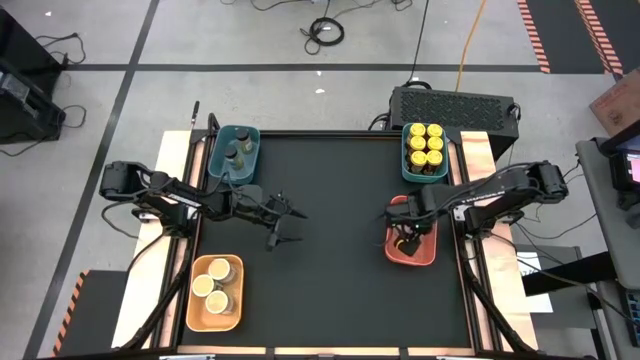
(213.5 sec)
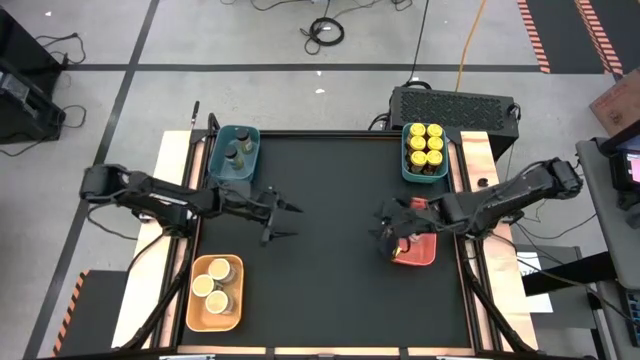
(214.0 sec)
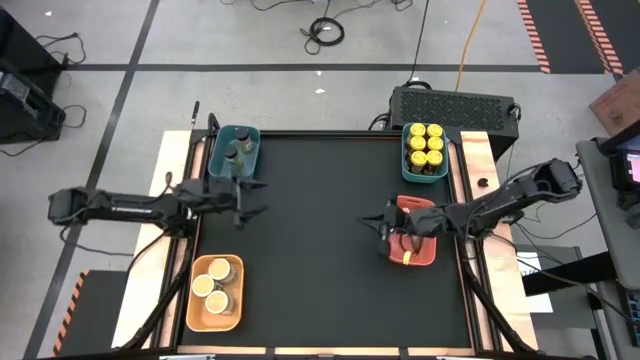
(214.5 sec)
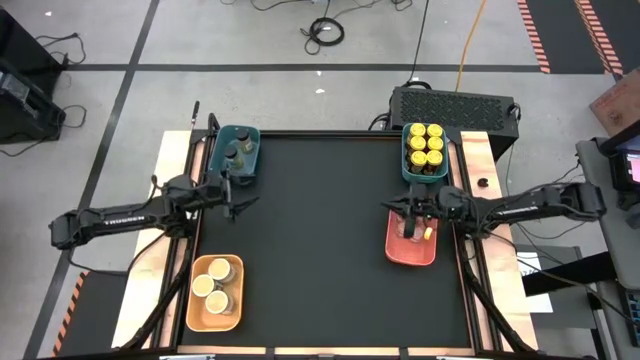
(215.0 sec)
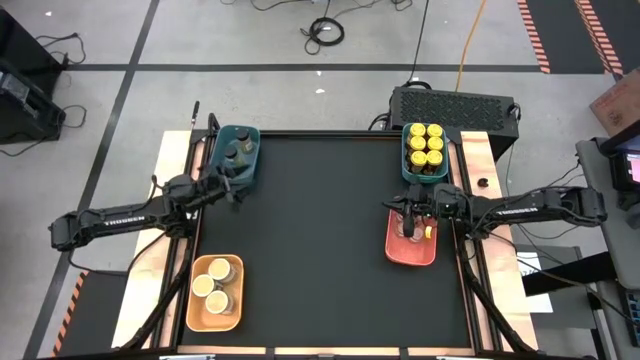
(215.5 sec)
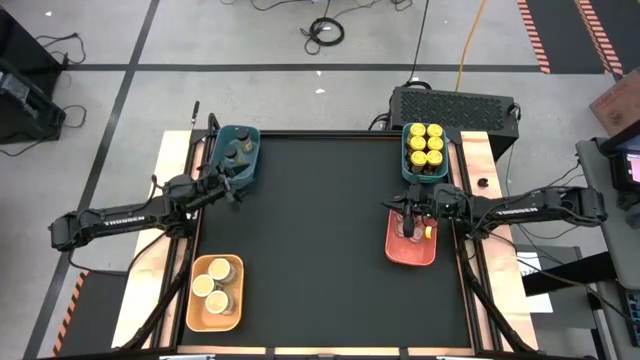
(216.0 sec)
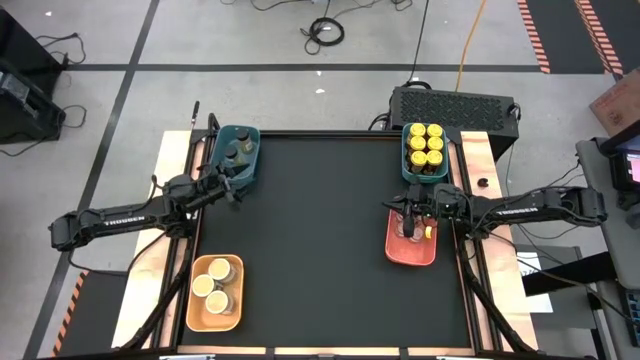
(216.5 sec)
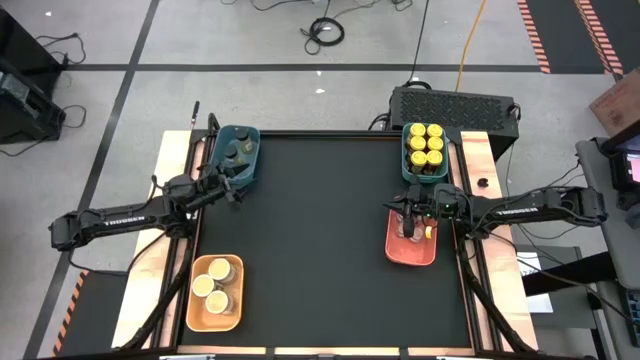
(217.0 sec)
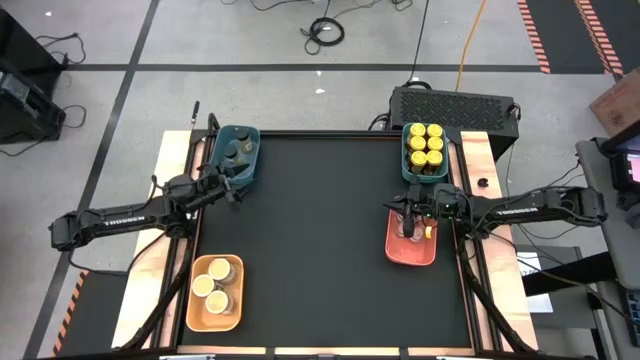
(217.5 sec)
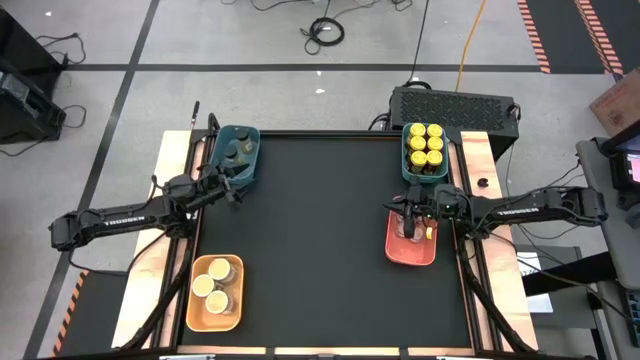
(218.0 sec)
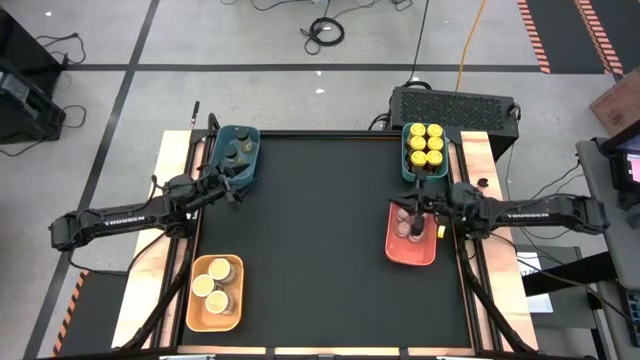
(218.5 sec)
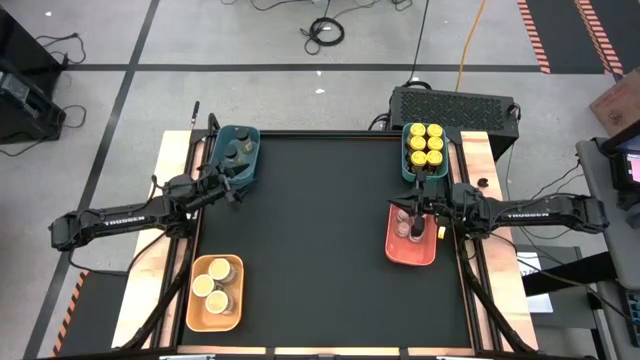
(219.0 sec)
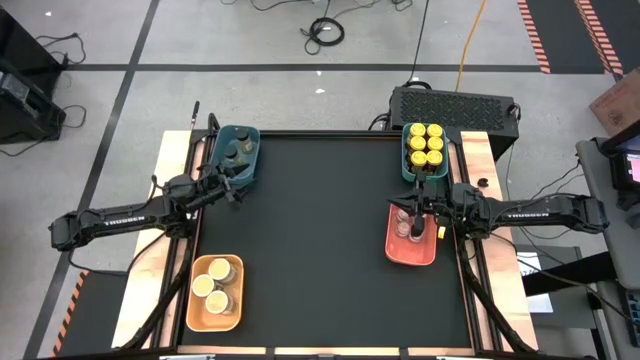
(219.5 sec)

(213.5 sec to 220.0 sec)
Task: Sort spices by type
Return to home position

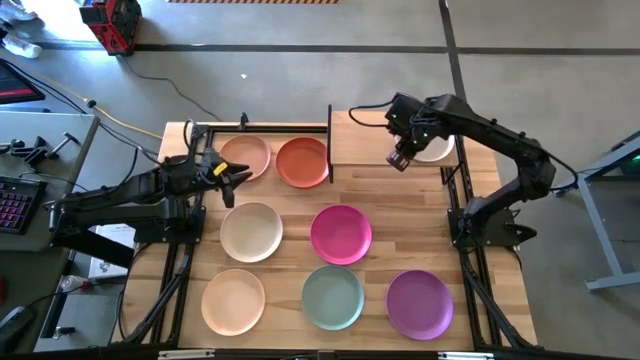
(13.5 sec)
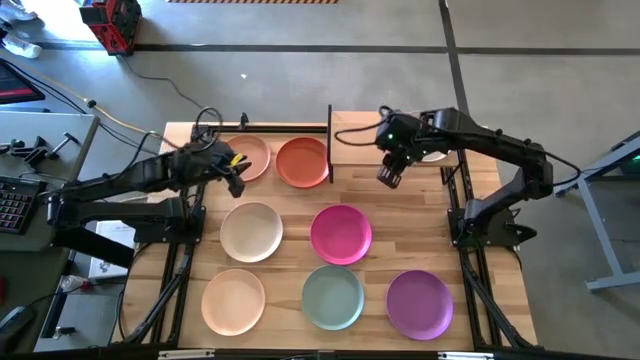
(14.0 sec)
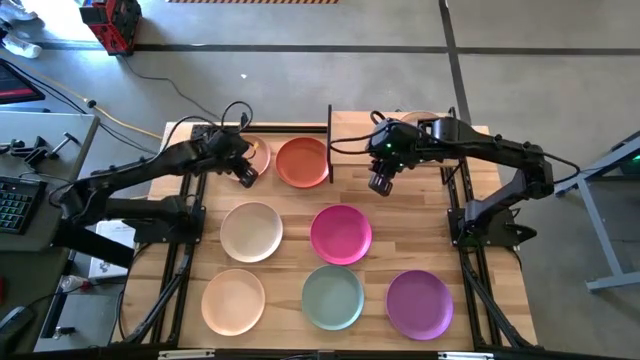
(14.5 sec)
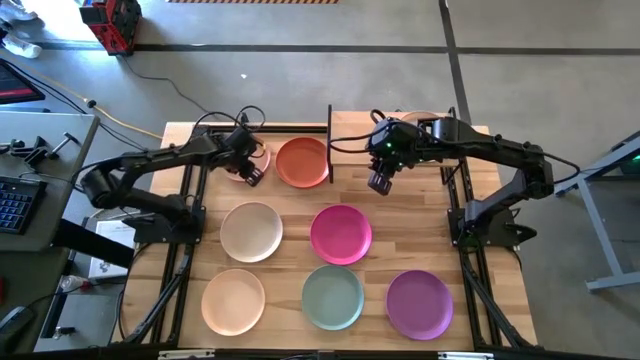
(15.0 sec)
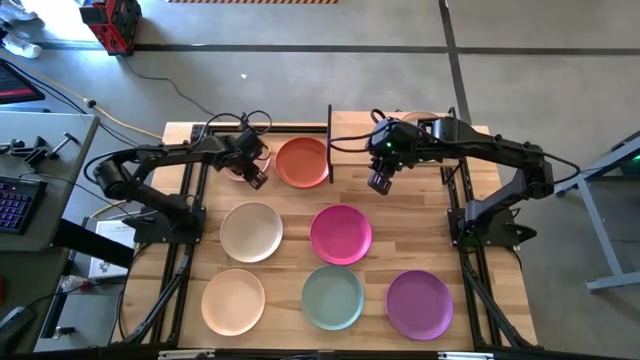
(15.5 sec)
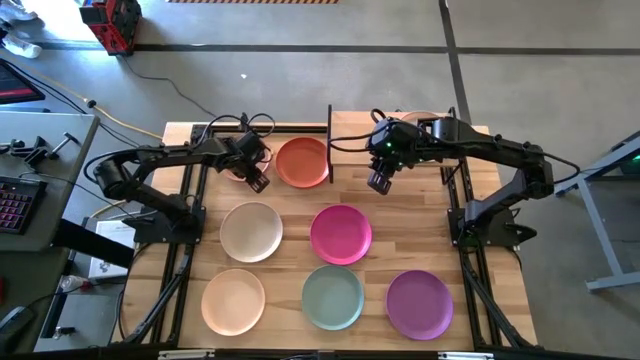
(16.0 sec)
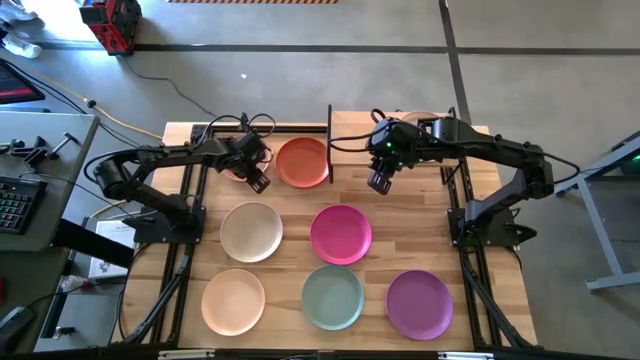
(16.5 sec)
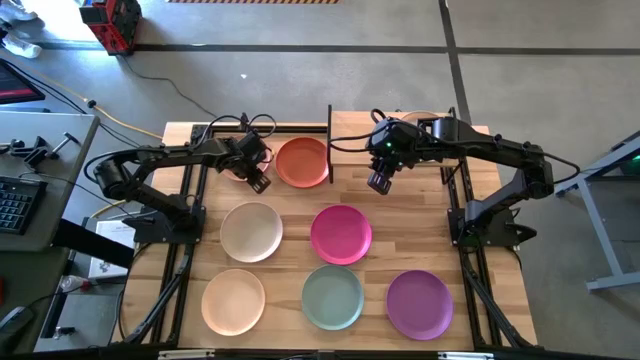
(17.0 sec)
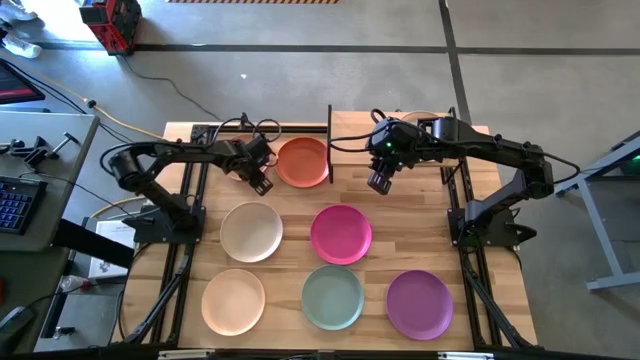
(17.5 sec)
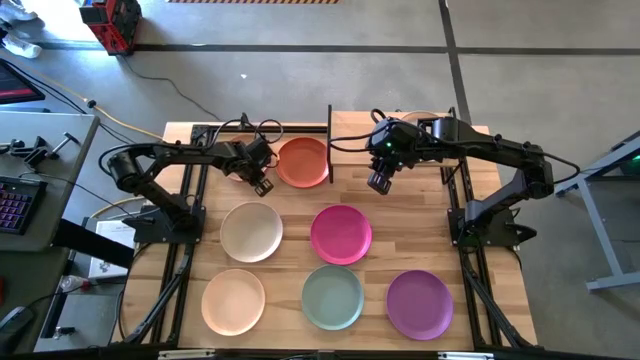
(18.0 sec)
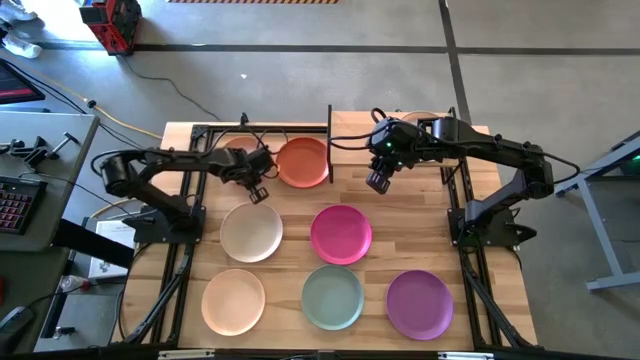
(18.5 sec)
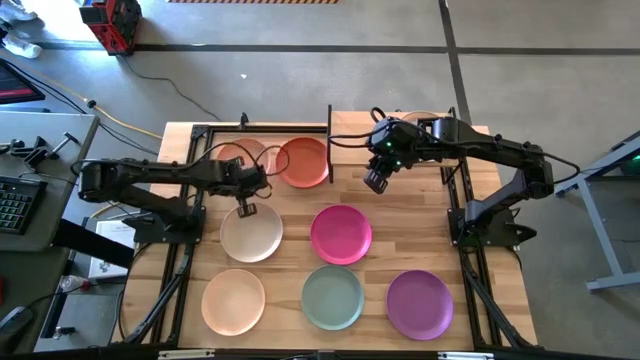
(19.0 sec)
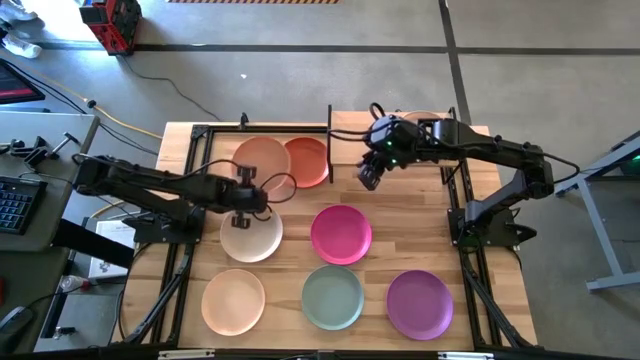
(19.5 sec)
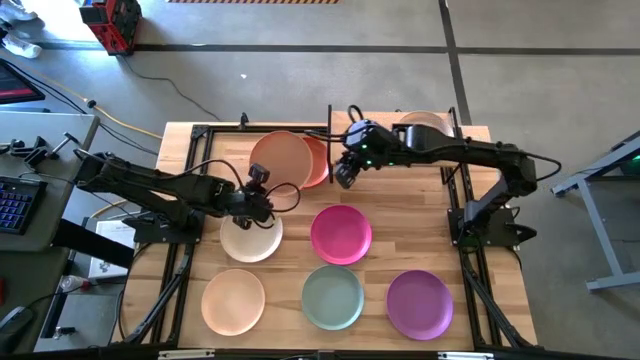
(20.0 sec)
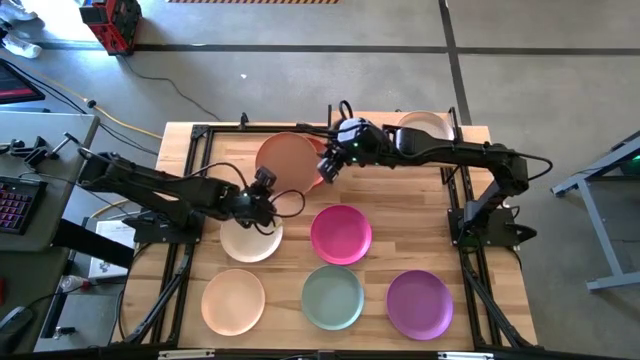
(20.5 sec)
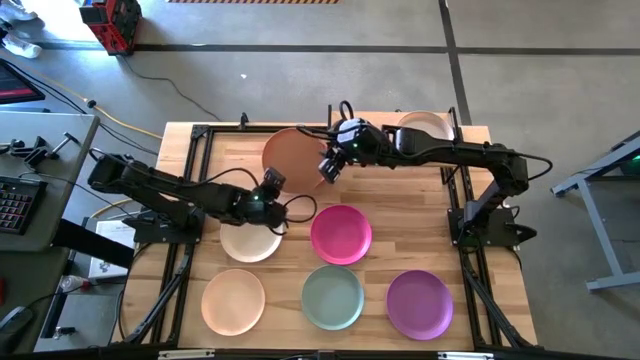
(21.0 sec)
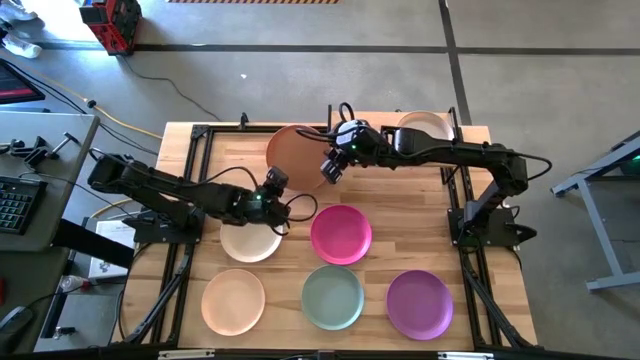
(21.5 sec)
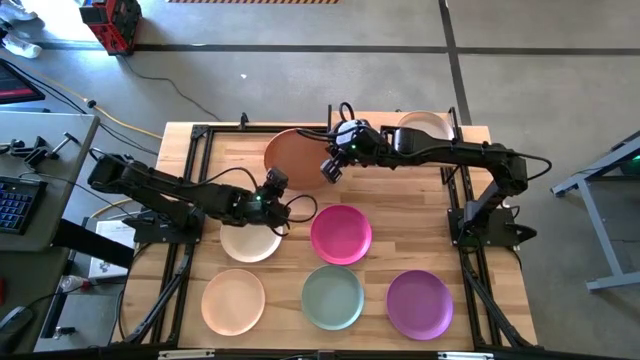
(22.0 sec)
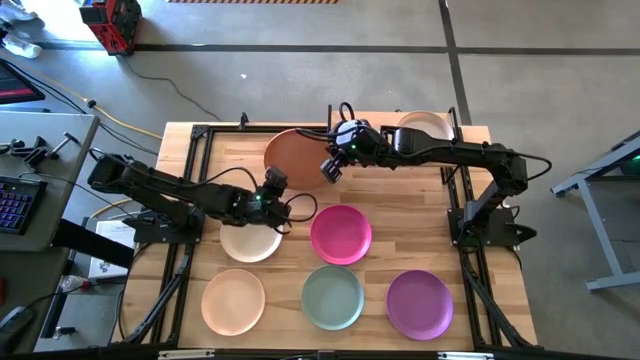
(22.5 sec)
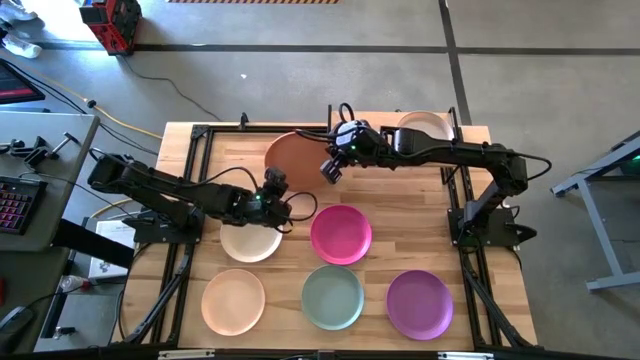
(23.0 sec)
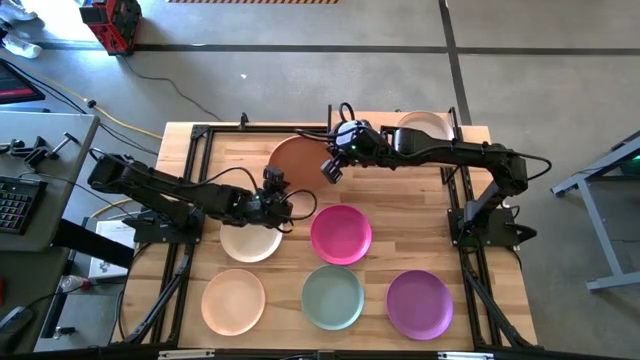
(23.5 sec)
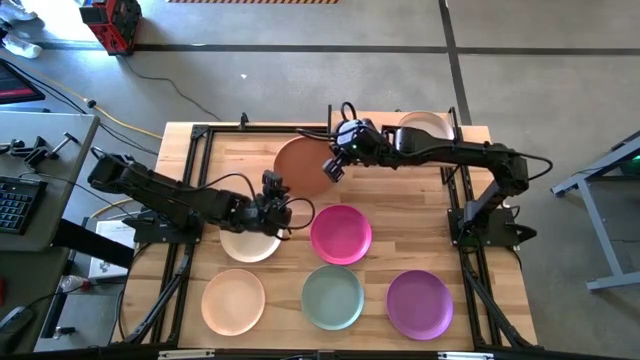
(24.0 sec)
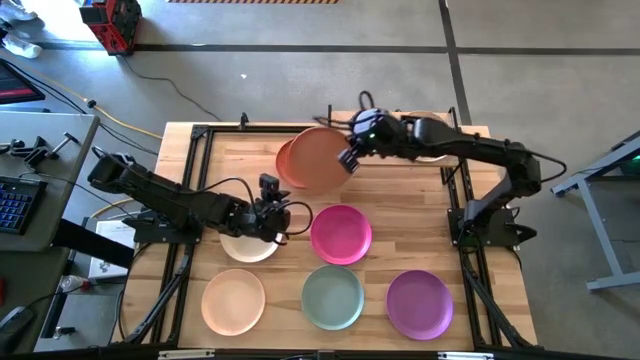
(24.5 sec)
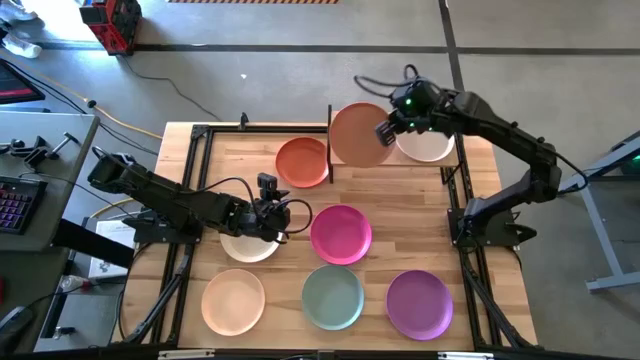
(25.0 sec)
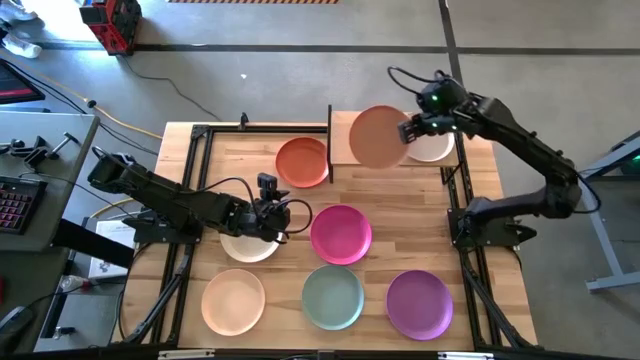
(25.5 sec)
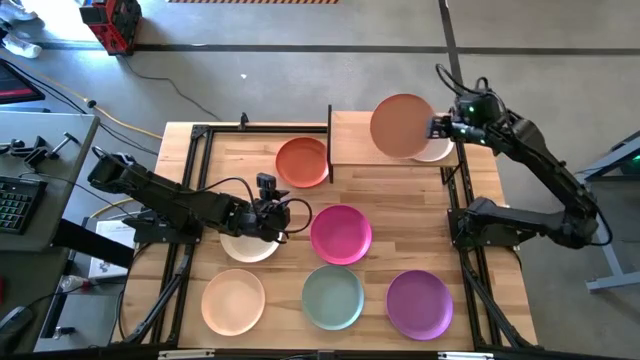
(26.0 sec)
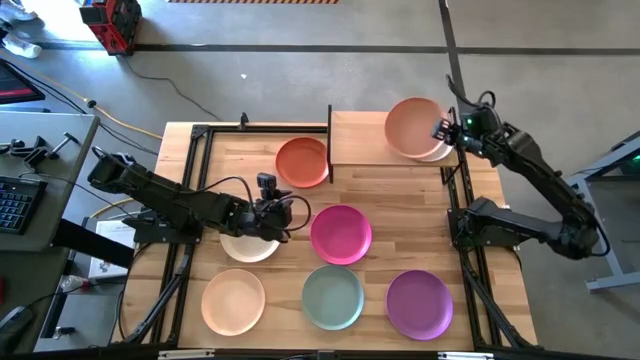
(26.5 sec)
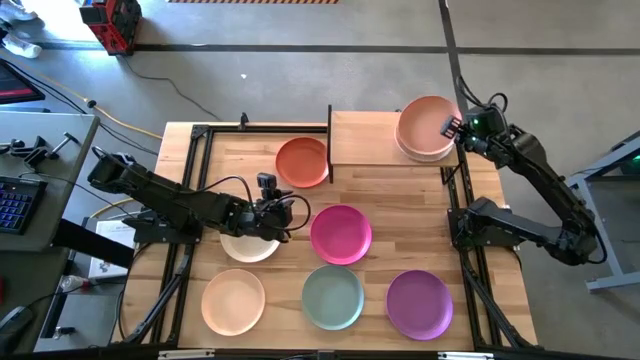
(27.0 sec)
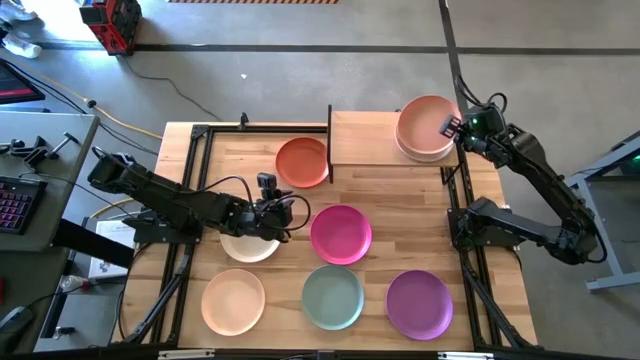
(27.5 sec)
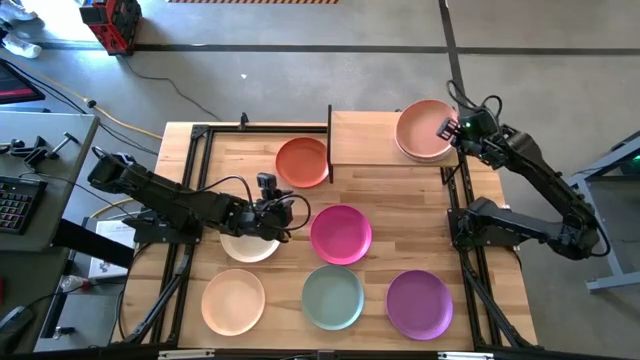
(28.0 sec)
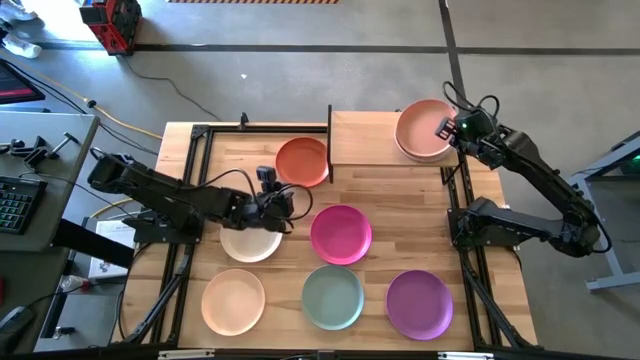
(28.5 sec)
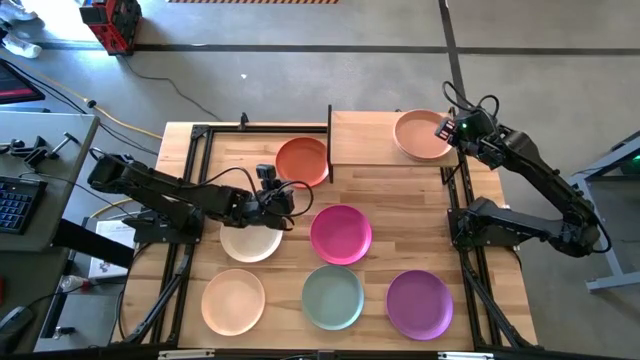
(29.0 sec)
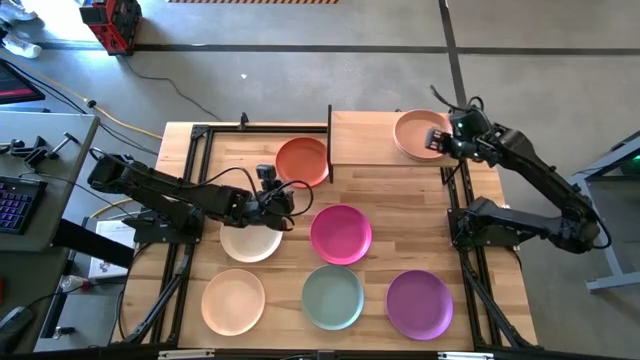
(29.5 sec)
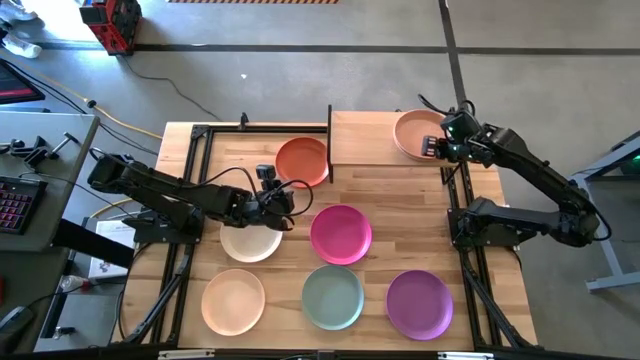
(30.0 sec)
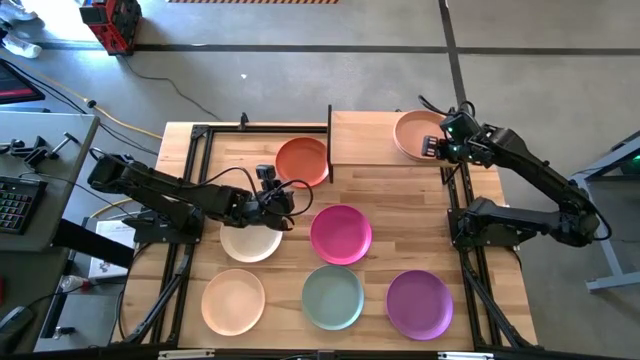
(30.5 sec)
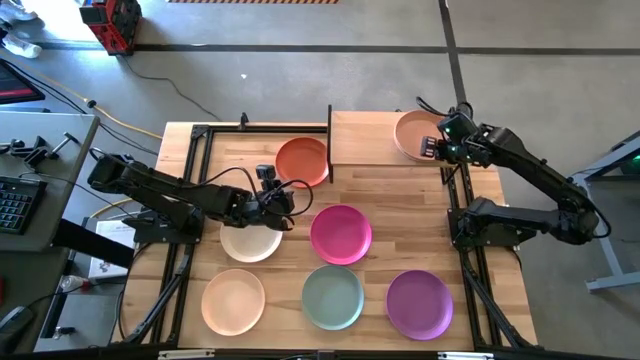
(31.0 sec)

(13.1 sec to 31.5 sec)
Task: Place and stack plates onto a shelf
Stack the light orange plate on top of the white plate on the shelf
